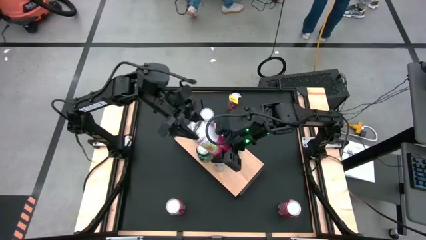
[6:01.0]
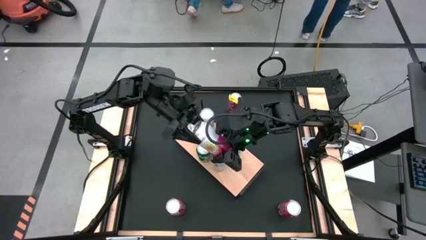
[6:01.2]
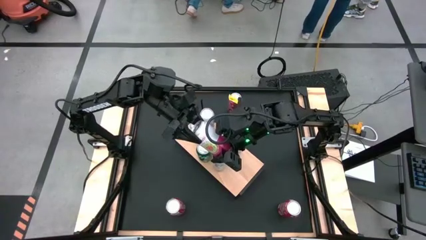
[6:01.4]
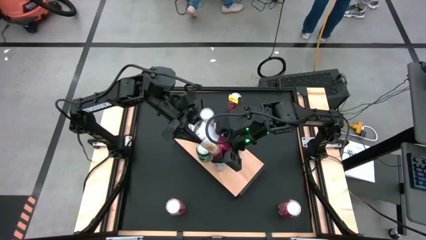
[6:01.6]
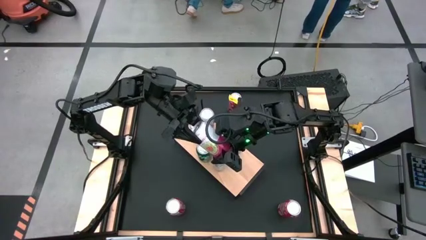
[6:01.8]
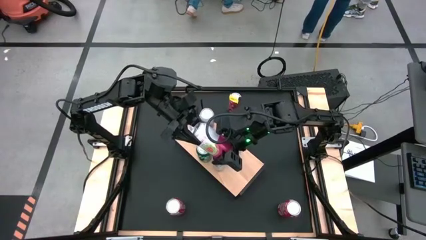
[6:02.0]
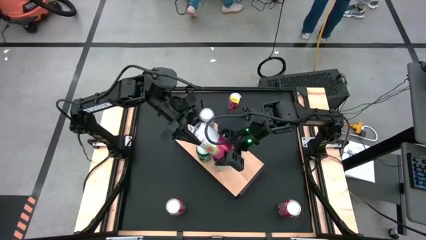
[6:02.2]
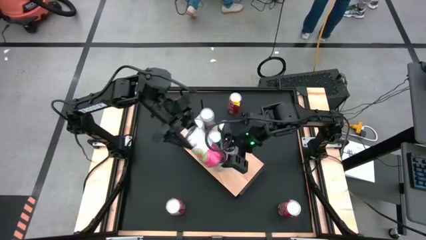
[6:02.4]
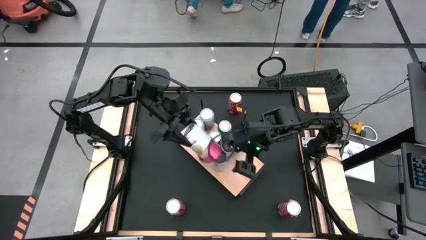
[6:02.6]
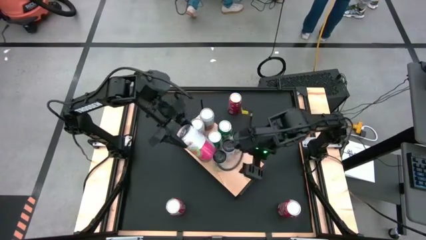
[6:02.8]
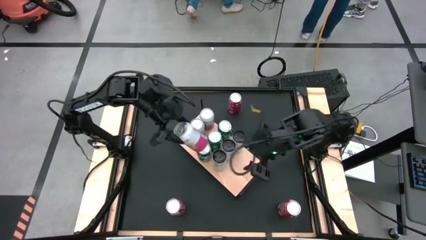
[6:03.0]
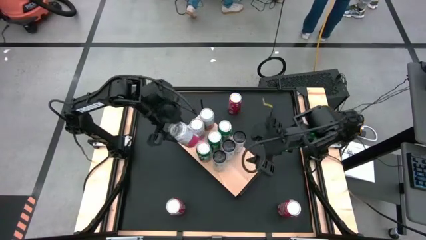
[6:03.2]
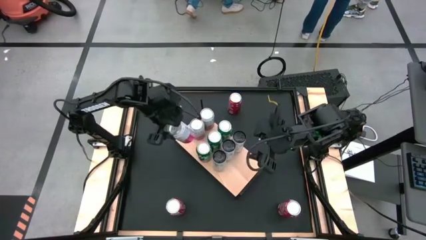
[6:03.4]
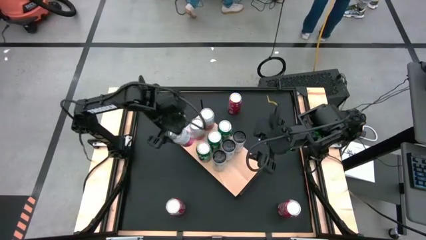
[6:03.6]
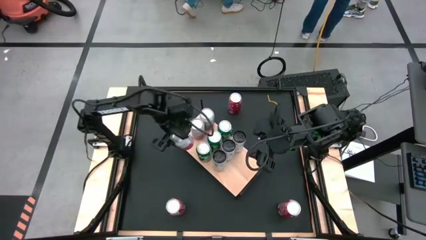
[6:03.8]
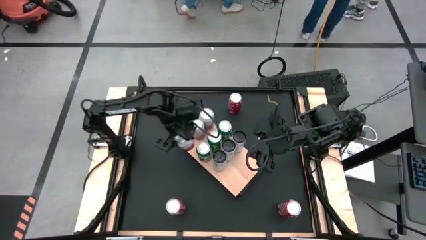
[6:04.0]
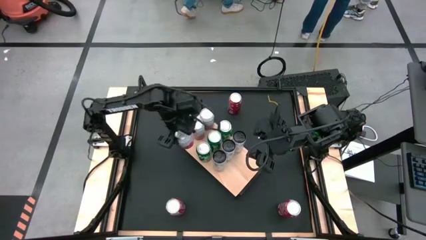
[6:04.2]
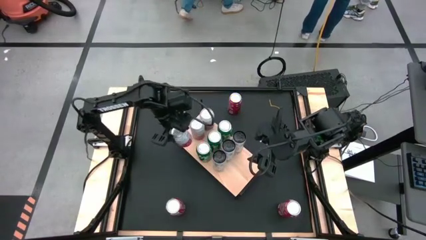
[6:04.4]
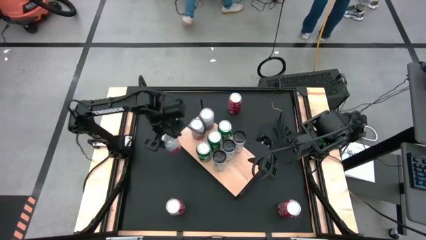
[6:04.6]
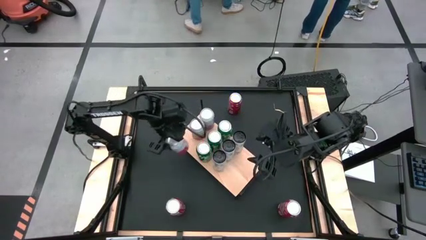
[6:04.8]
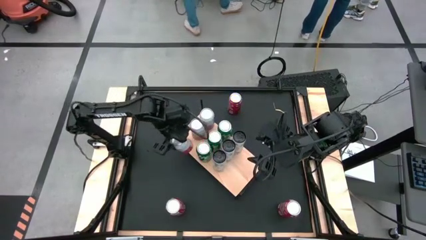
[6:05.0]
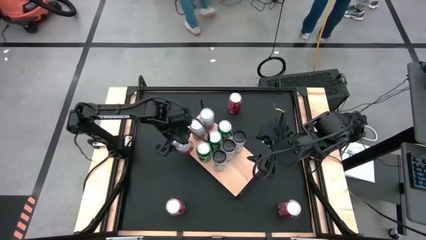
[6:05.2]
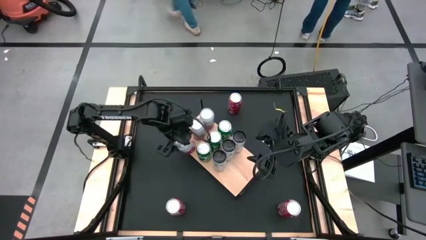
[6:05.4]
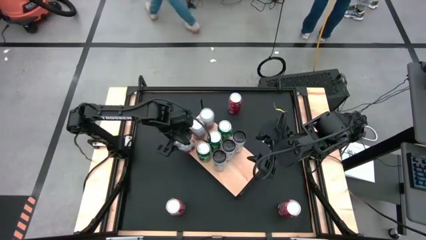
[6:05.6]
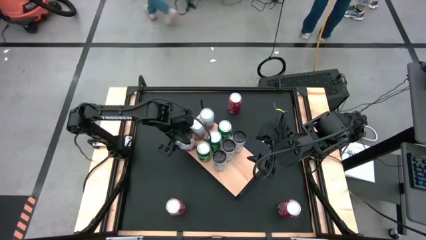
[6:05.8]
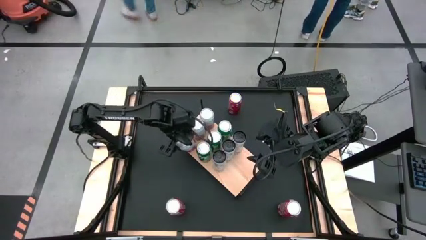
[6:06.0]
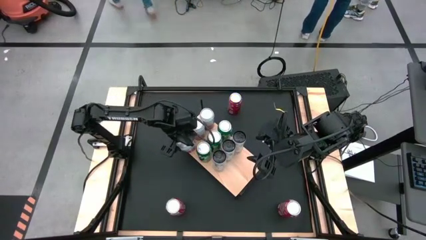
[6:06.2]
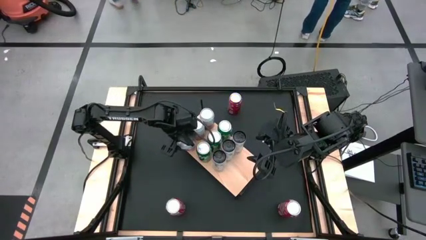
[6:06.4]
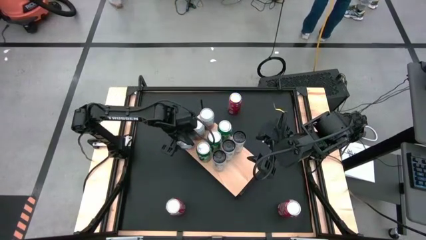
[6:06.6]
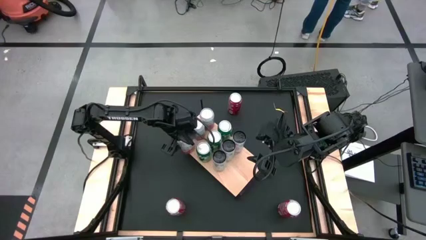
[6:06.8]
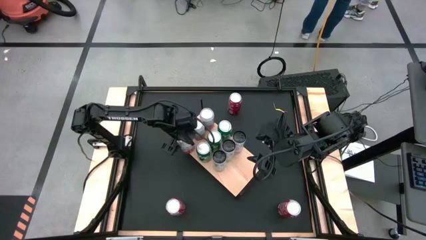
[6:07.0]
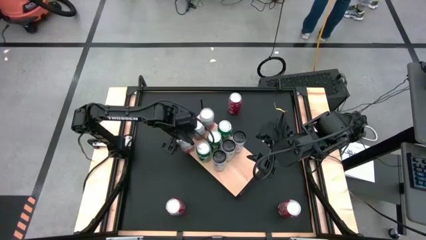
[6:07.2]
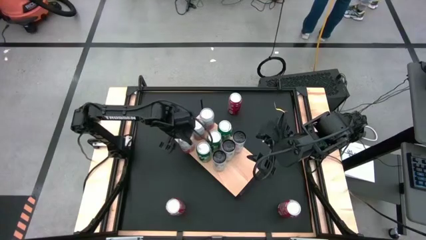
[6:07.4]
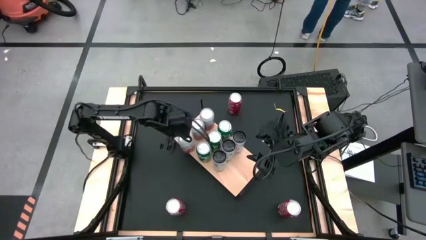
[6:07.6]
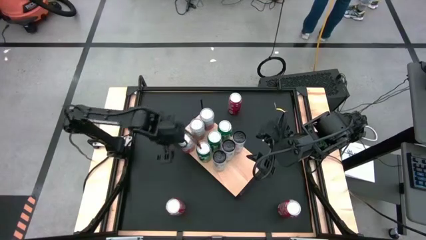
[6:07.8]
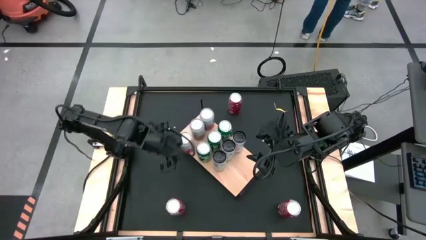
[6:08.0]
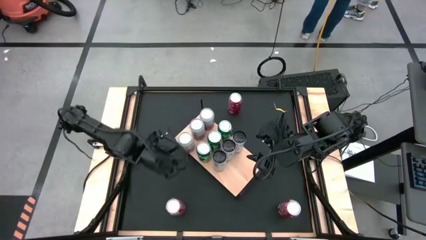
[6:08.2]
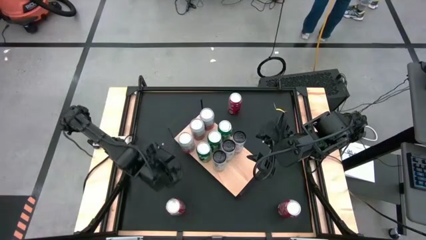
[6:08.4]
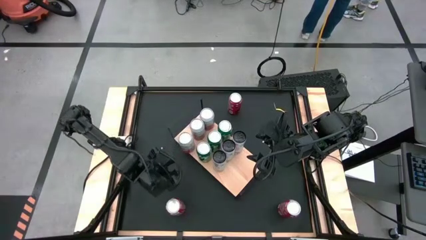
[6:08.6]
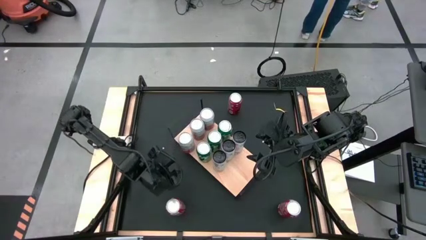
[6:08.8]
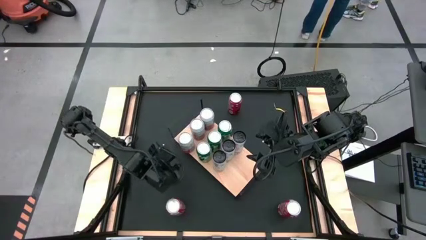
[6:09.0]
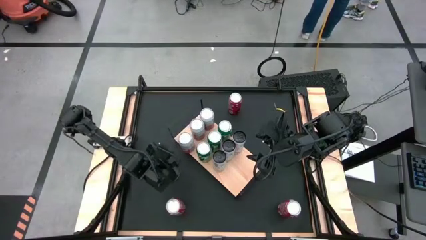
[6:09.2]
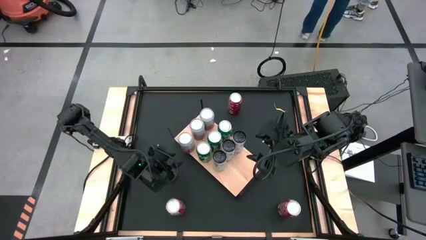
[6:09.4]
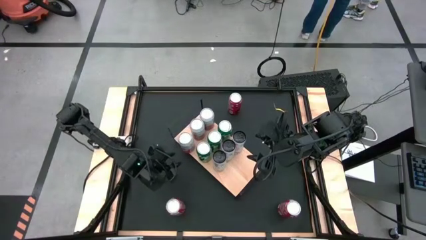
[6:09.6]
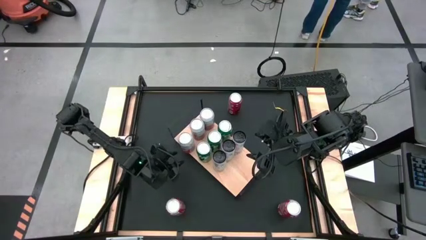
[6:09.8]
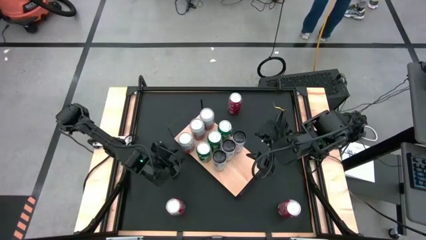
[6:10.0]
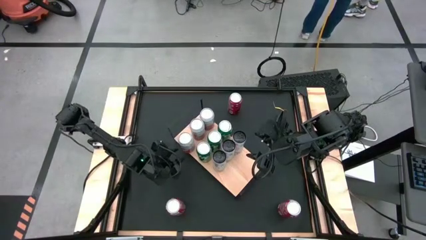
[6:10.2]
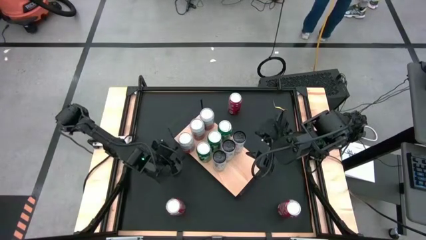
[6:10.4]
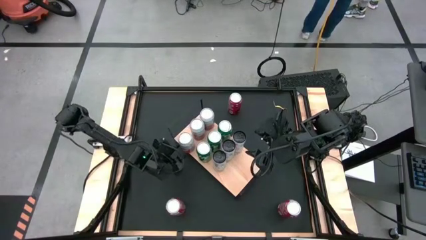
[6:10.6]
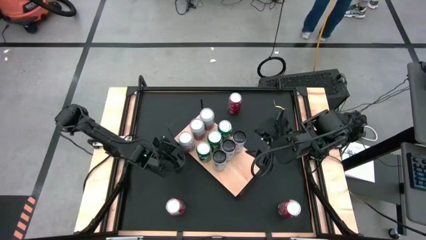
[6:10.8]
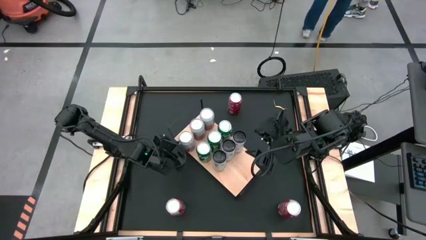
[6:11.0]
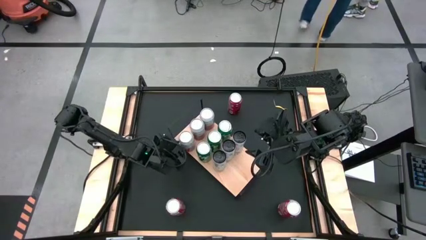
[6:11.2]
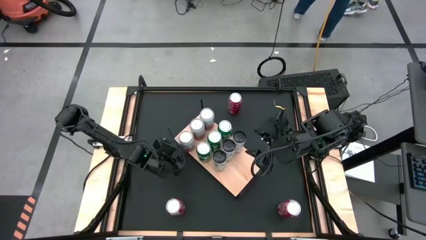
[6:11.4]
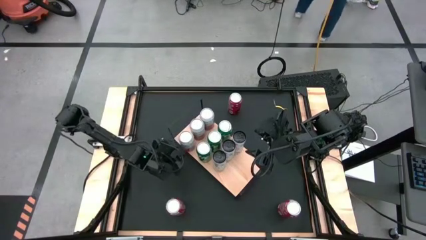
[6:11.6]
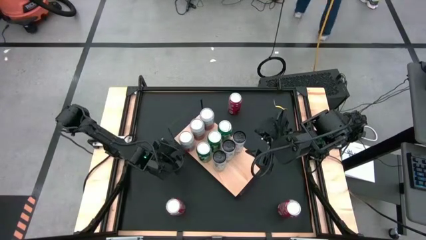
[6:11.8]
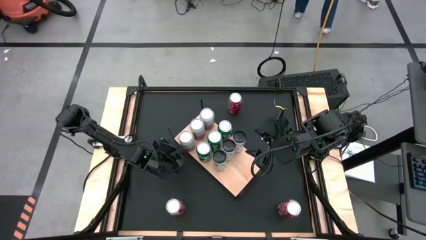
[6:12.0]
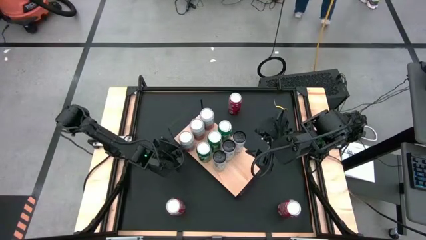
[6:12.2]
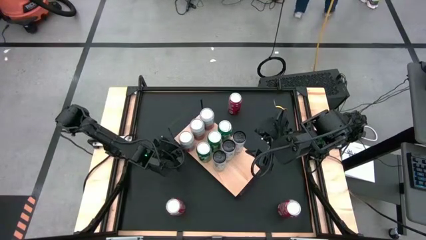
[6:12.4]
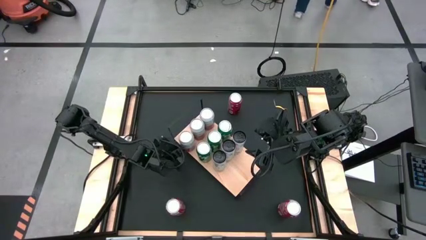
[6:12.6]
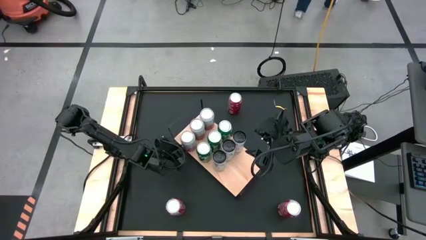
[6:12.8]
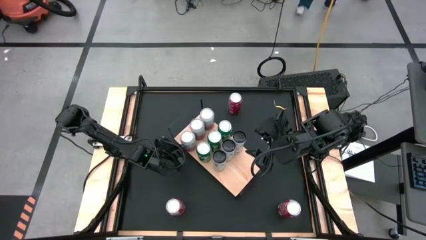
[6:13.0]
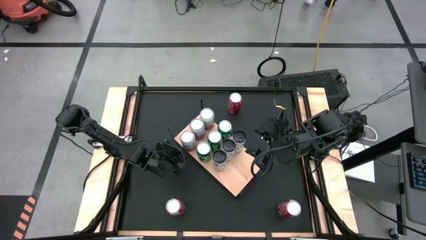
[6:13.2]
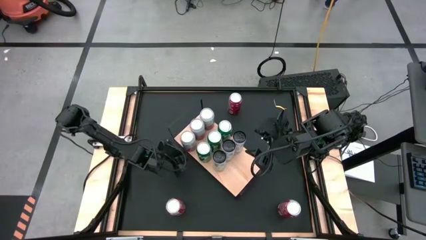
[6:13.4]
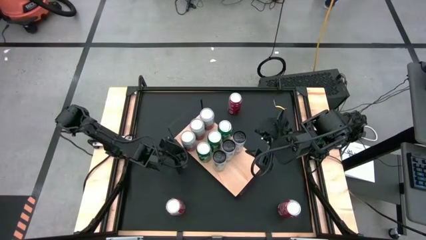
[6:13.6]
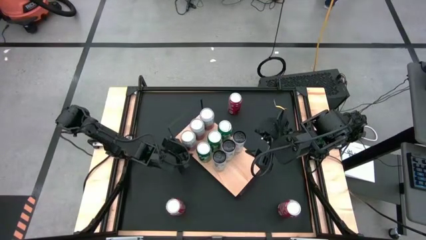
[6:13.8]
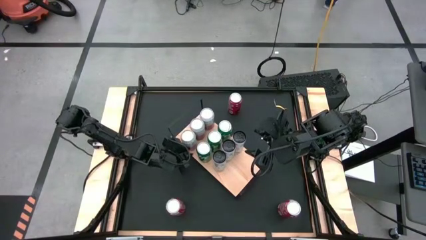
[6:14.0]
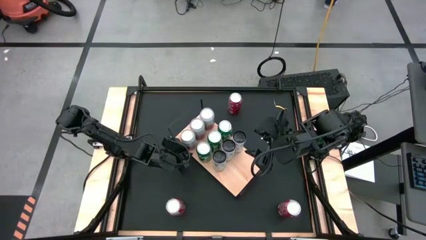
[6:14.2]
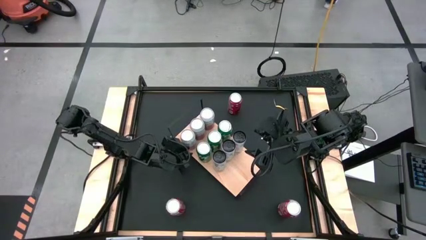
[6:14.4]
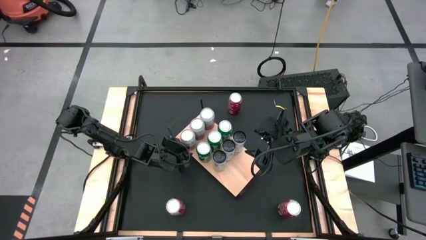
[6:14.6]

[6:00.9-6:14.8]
Task: Place canned beverage on shelf
Put the white and pink soda can aligned with the other white and pink soda cans
